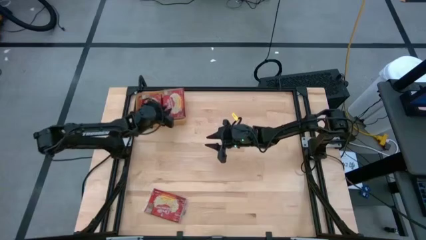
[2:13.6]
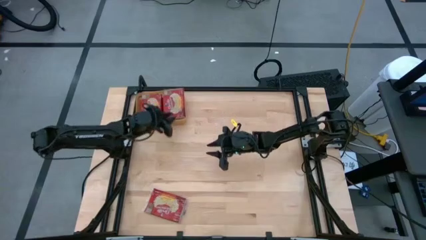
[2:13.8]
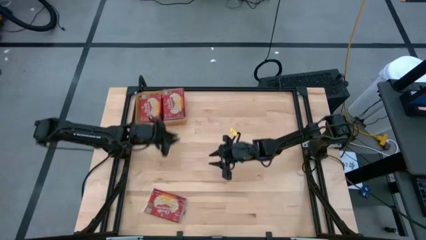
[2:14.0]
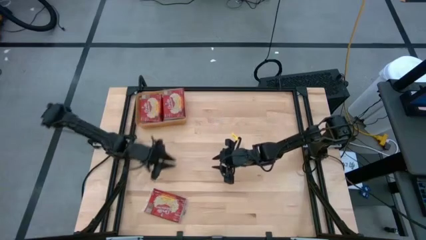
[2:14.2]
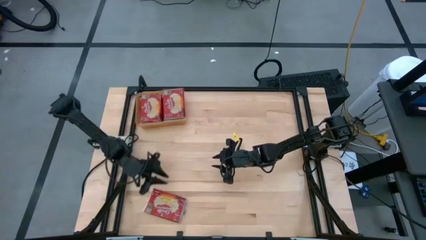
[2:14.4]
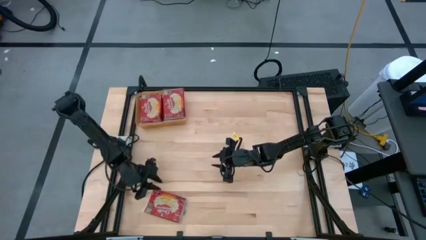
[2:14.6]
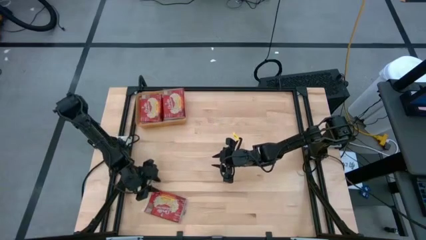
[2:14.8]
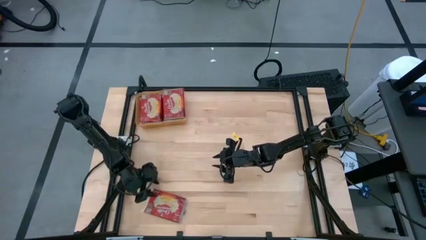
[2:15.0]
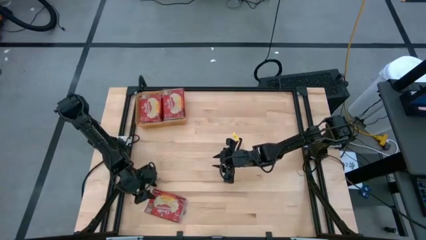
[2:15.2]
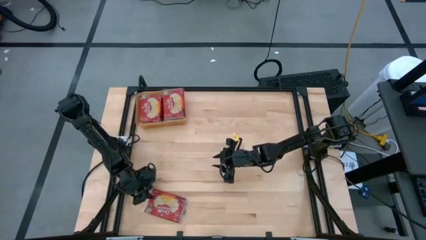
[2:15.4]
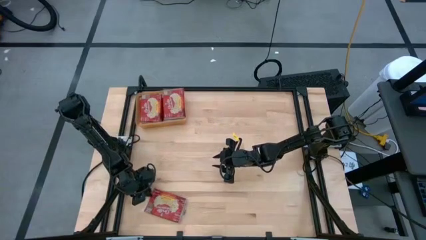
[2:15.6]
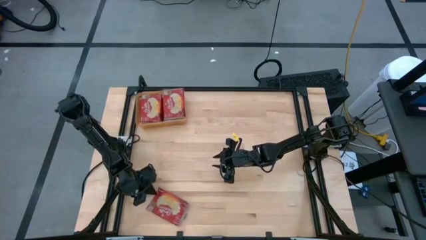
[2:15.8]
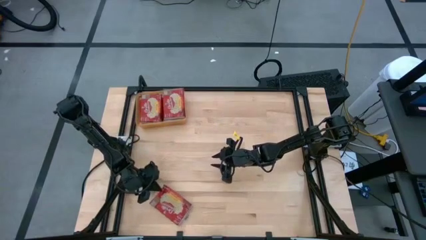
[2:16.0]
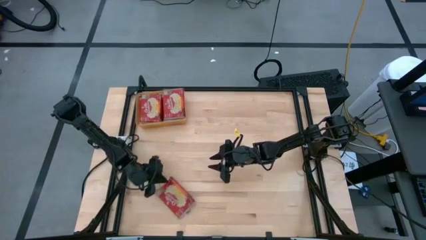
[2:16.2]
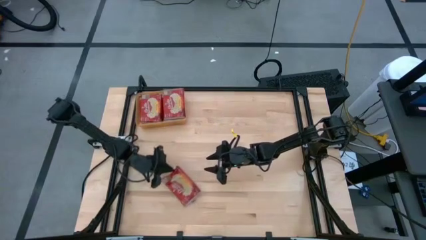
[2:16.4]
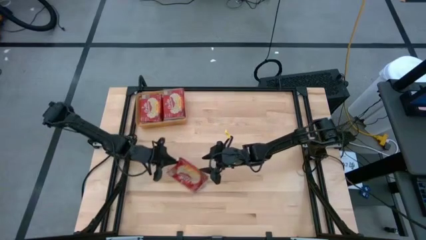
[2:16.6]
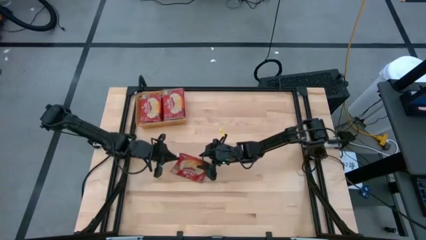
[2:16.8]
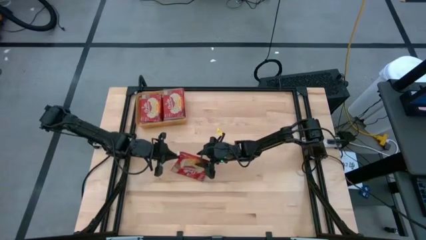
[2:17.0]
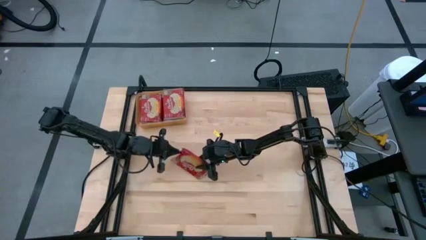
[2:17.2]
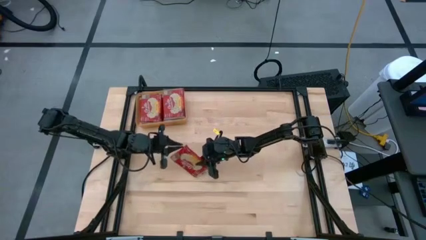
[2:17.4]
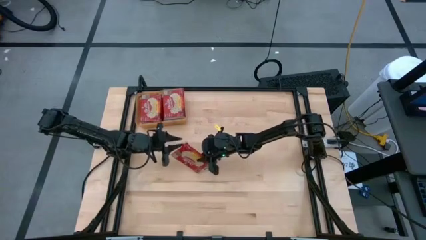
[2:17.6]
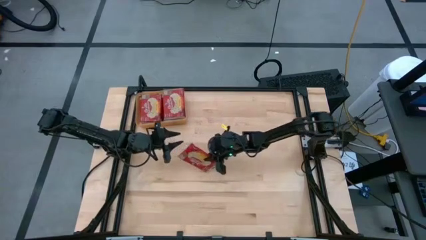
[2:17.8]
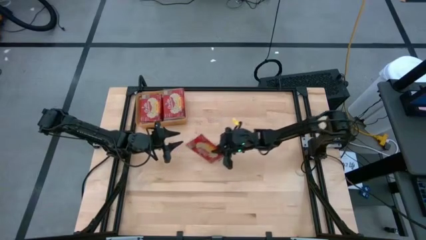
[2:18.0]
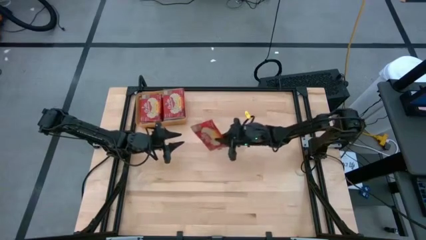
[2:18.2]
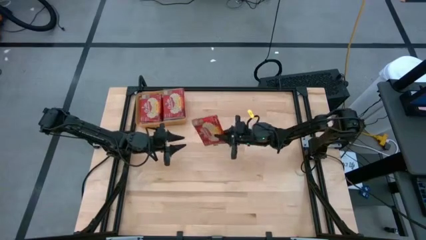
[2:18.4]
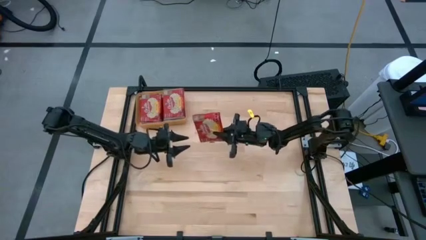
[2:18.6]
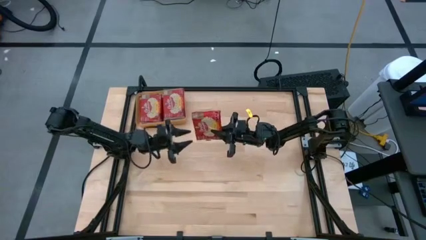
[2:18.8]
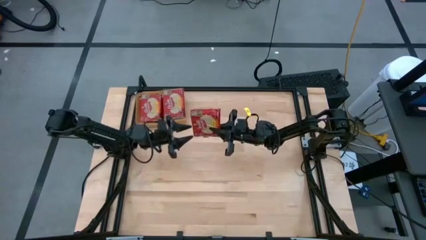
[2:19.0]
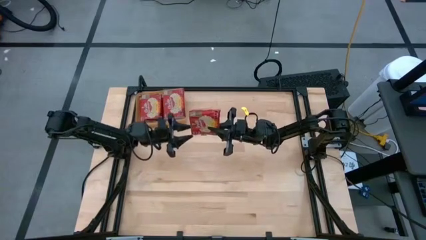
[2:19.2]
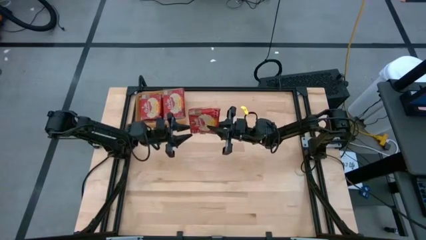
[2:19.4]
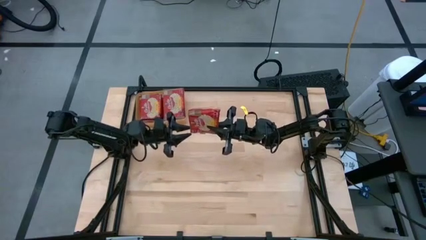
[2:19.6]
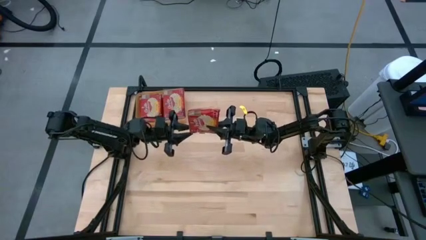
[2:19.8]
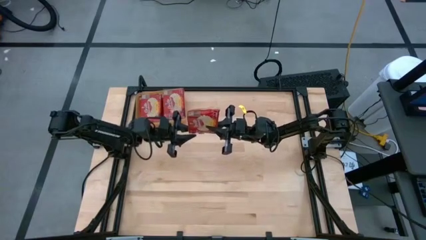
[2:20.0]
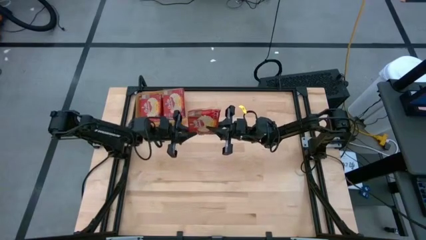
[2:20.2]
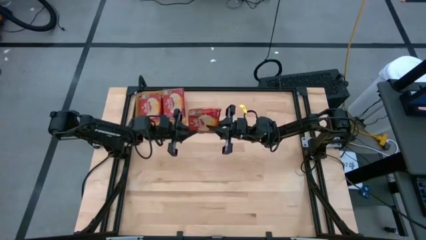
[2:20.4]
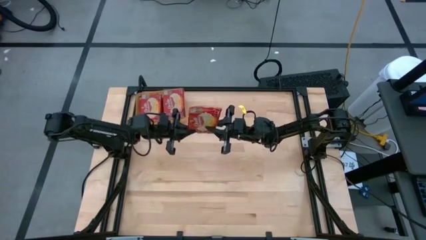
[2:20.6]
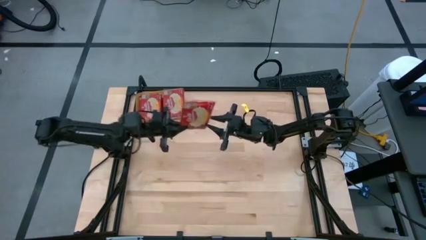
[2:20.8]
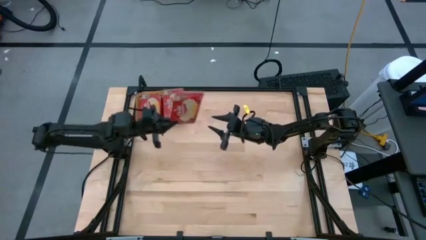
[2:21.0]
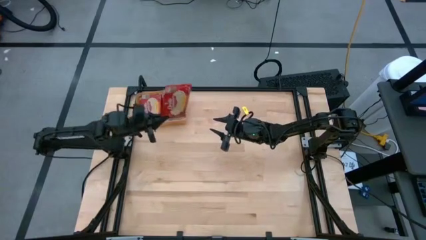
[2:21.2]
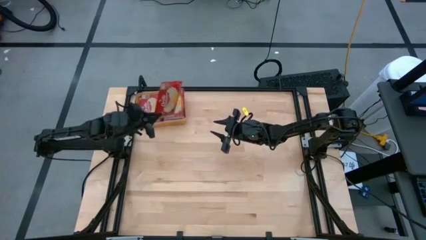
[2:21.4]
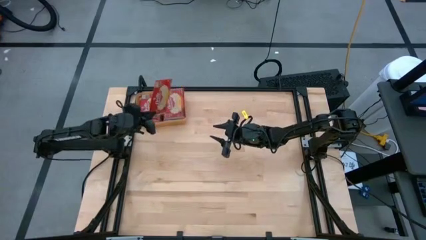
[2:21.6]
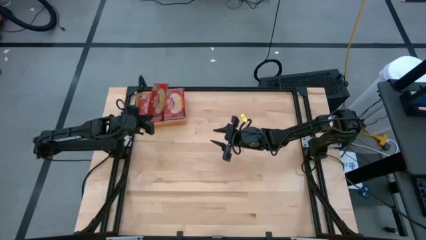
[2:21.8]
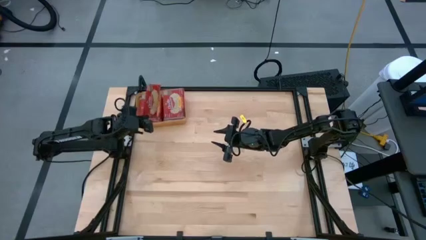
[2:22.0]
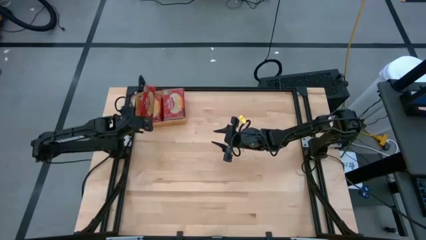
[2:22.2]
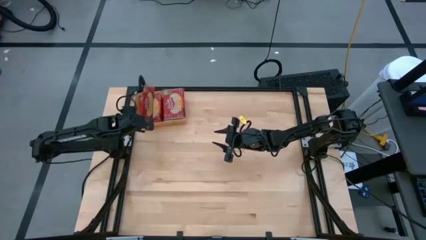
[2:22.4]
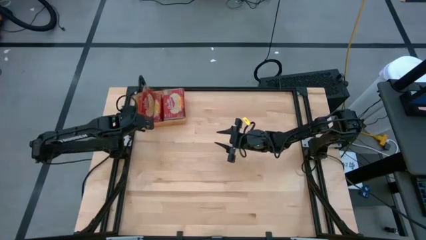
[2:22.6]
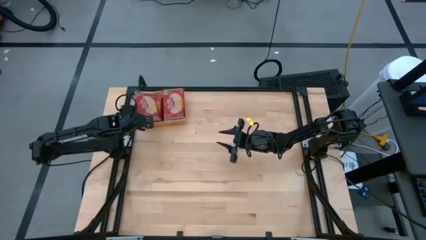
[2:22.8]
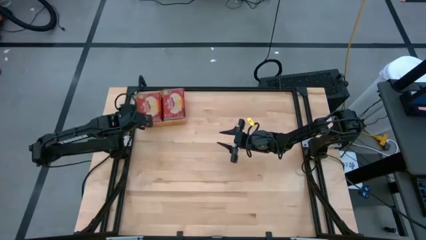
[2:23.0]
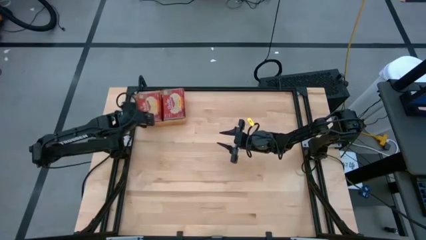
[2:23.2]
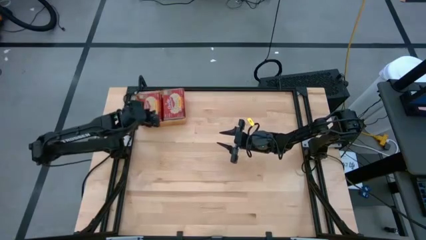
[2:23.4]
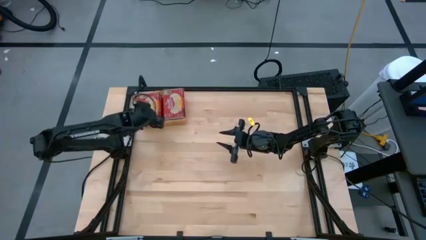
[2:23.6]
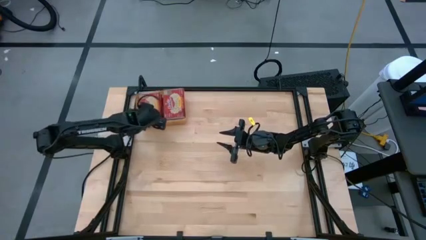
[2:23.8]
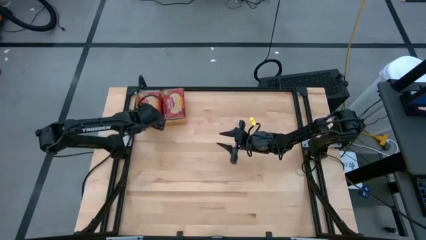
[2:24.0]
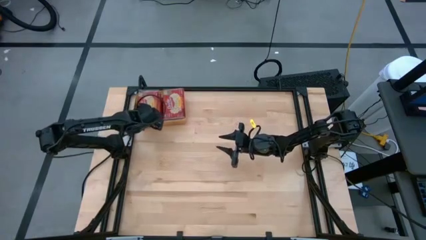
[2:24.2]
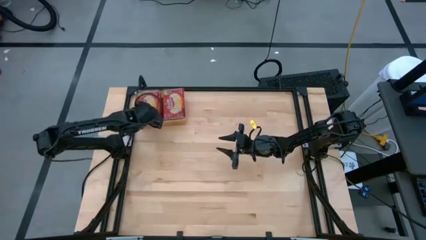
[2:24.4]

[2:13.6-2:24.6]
Task: Sort popcorn bags into baskets
Put the red popcorn bag into the orange bin
